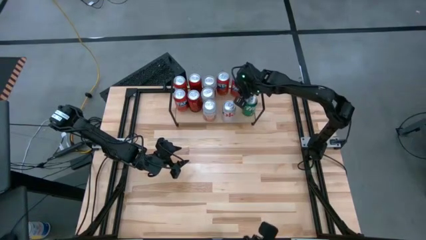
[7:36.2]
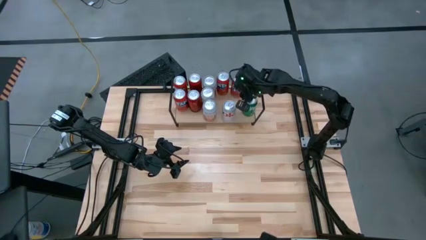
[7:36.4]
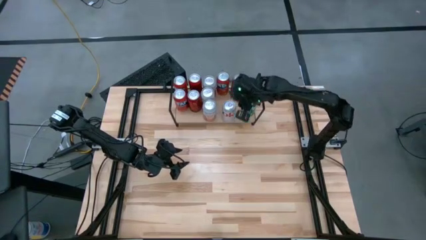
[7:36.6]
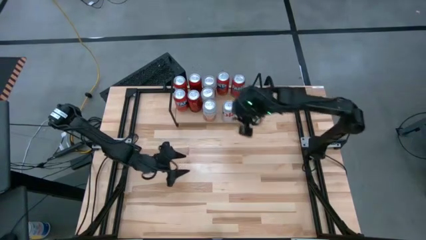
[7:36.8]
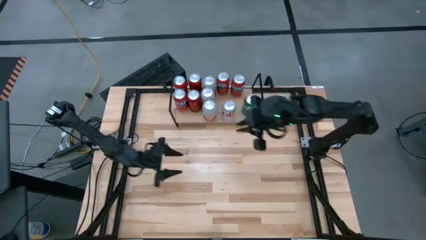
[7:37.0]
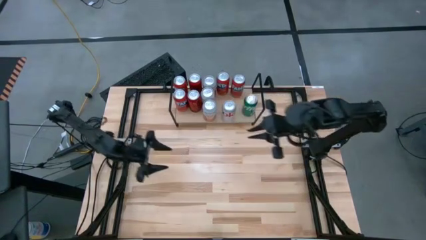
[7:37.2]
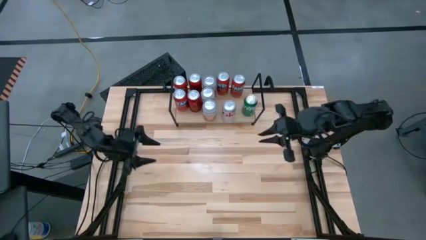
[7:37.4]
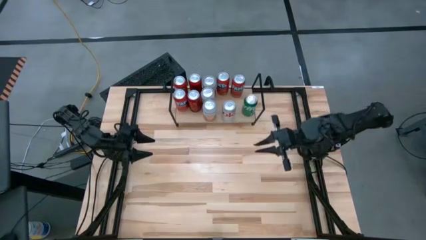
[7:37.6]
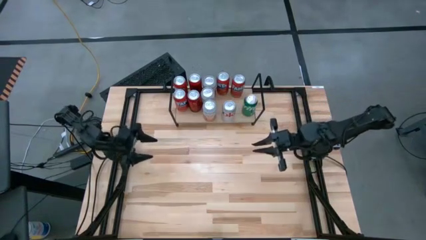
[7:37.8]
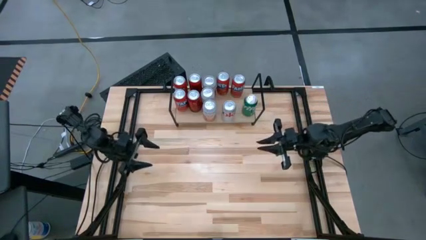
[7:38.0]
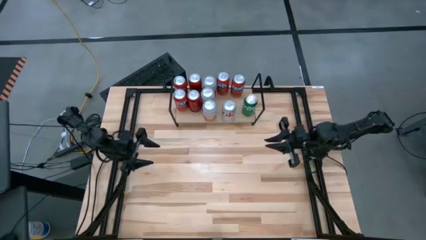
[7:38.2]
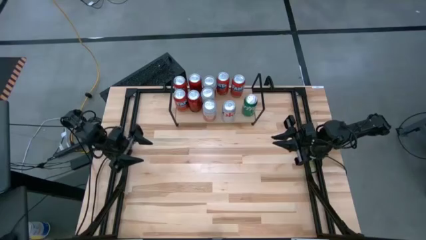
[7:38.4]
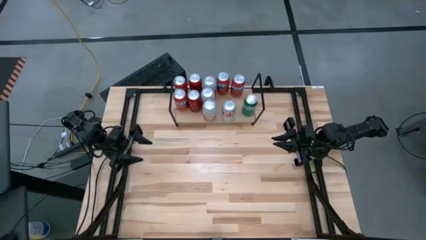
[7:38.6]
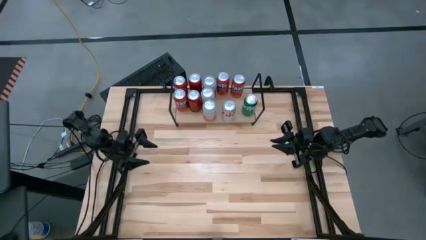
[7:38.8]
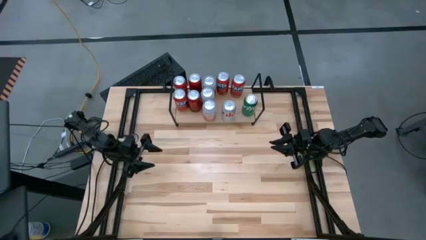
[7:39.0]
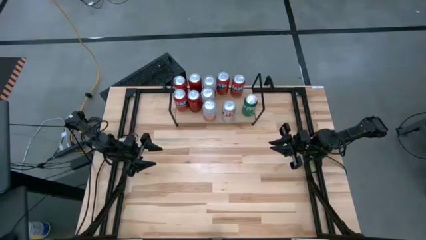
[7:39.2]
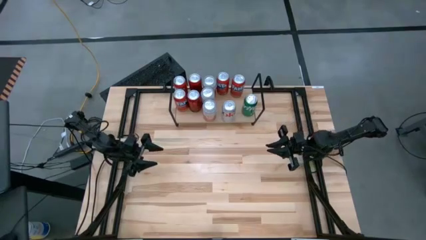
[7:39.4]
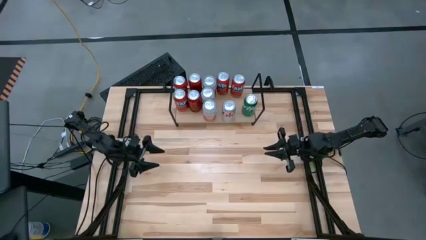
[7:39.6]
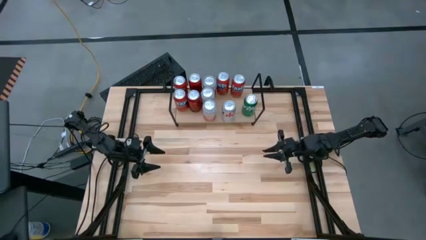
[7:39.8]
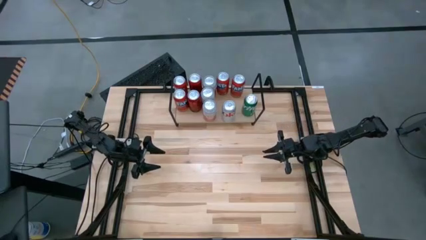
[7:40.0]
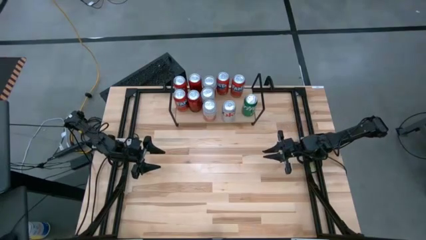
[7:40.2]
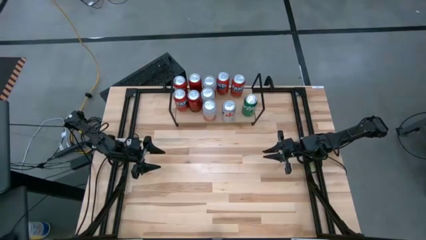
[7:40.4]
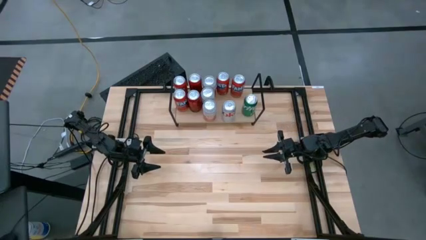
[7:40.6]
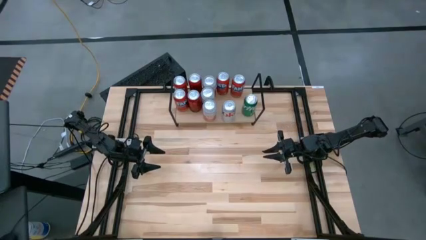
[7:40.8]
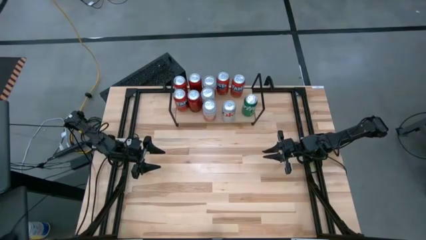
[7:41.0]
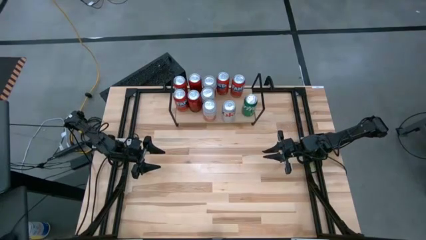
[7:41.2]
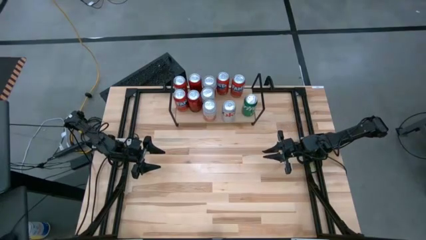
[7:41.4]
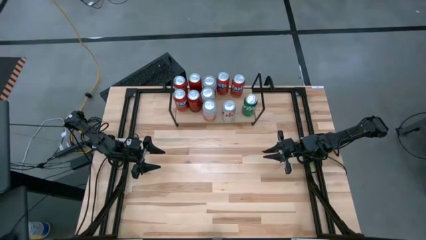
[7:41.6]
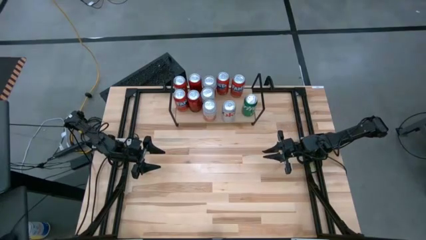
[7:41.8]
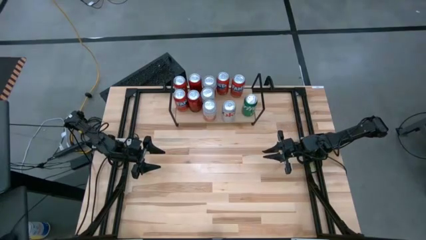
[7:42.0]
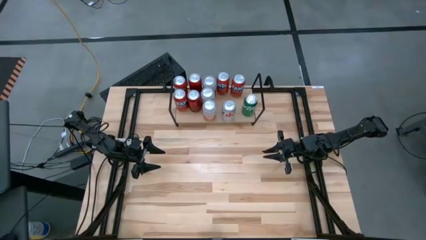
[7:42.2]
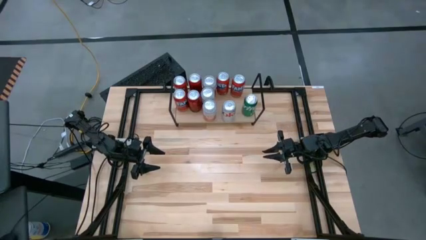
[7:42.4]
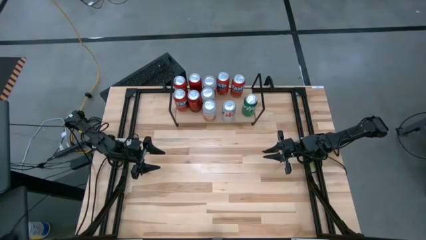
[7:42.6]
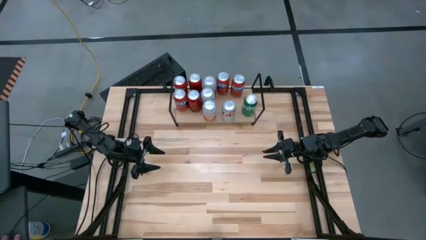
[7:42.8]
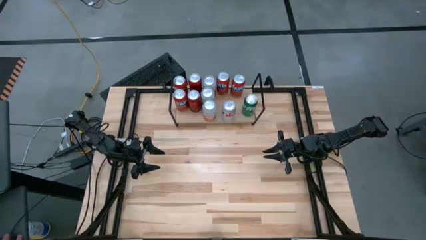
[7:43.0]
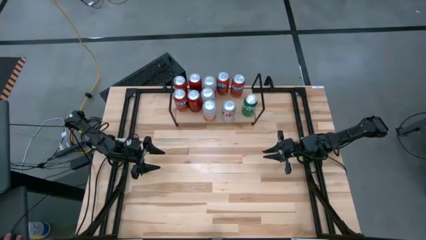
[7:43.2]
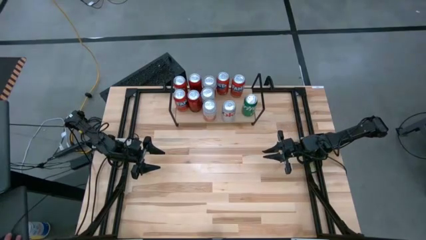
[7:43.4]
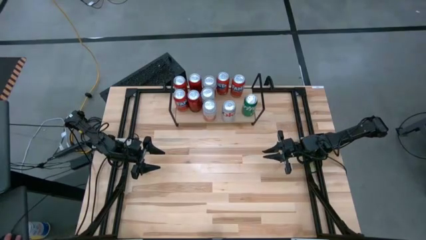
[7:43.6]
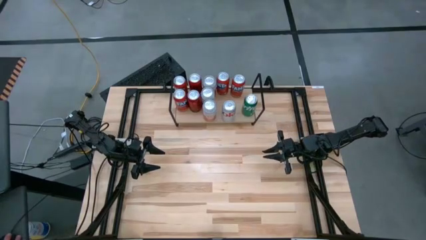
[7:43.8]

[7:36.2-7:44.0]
Task: Place canned beverage on shelf
Return to Home Position

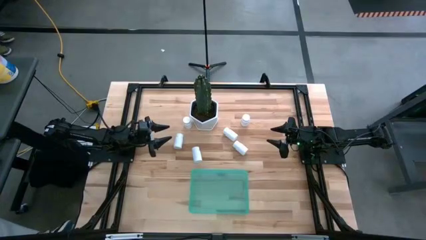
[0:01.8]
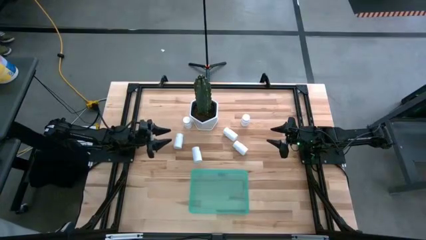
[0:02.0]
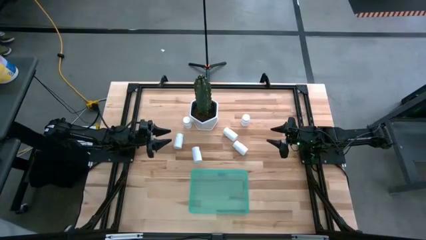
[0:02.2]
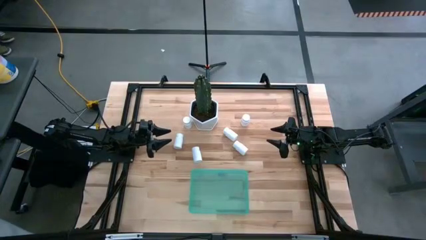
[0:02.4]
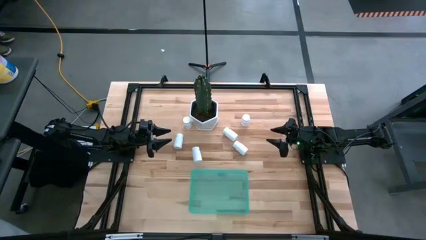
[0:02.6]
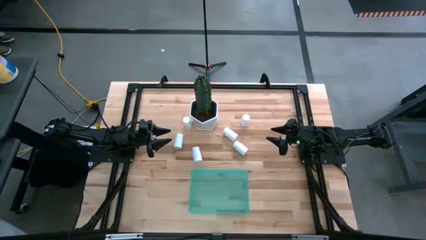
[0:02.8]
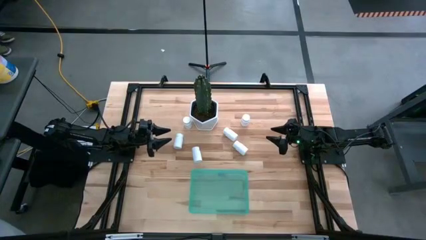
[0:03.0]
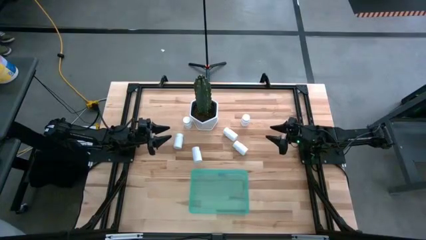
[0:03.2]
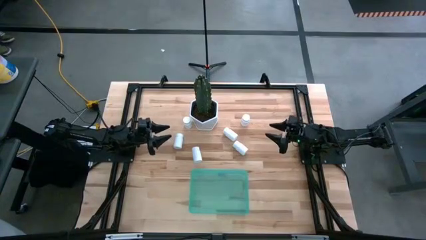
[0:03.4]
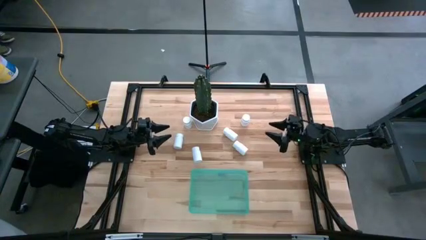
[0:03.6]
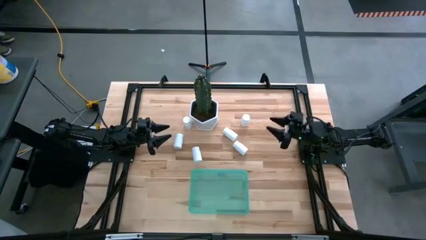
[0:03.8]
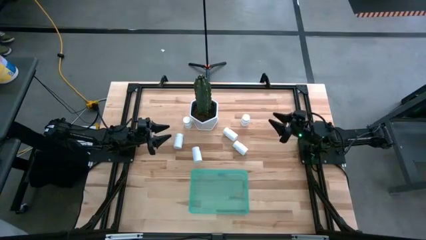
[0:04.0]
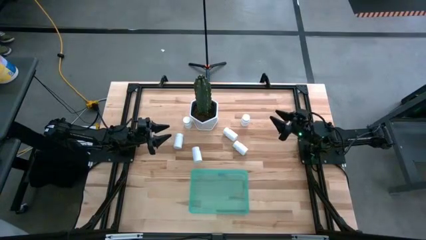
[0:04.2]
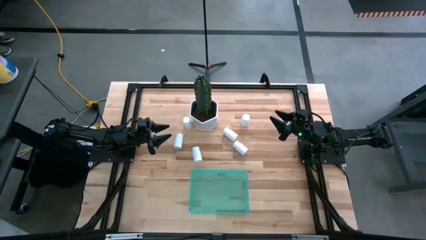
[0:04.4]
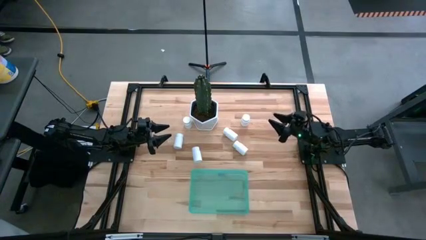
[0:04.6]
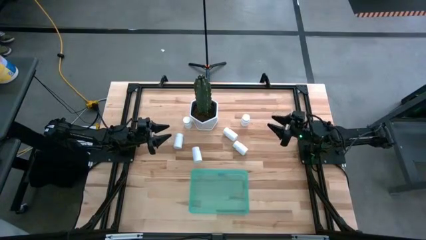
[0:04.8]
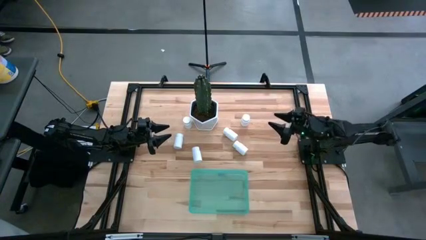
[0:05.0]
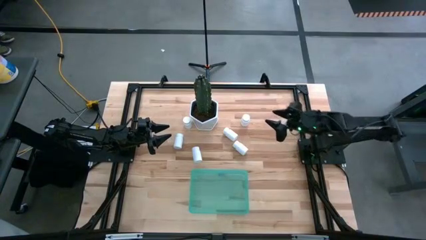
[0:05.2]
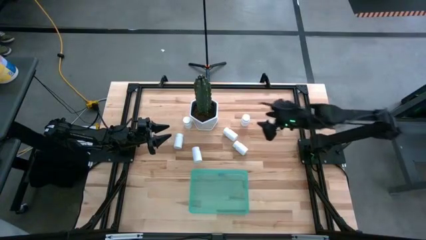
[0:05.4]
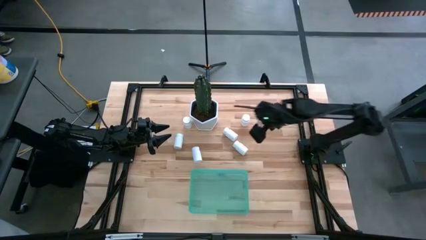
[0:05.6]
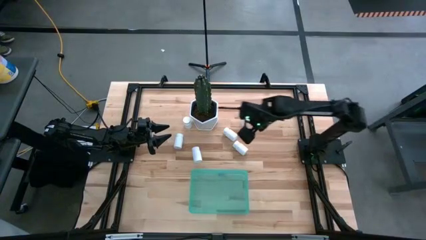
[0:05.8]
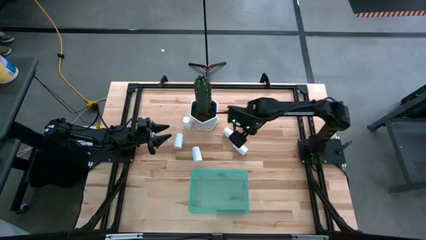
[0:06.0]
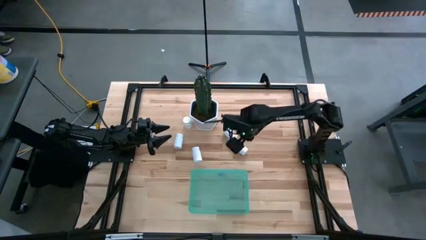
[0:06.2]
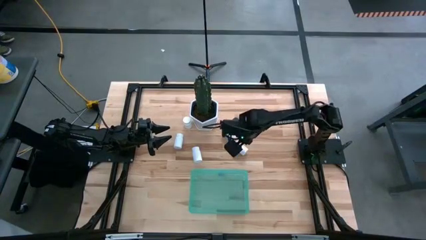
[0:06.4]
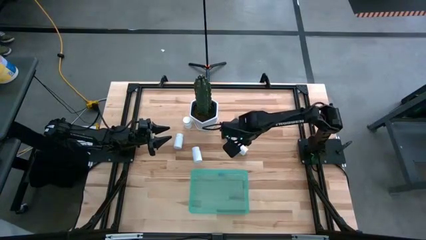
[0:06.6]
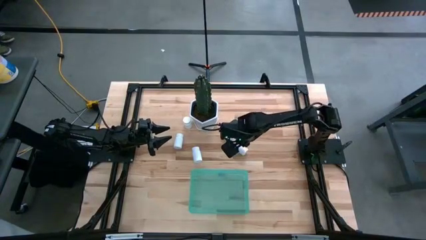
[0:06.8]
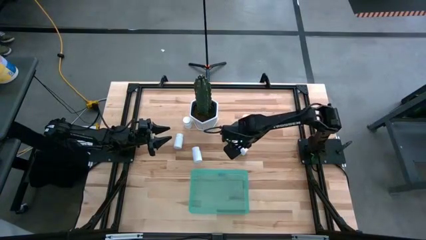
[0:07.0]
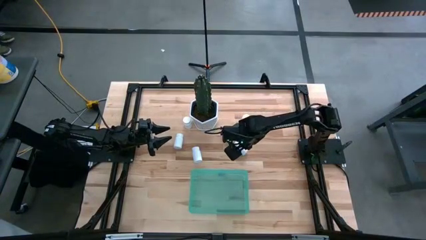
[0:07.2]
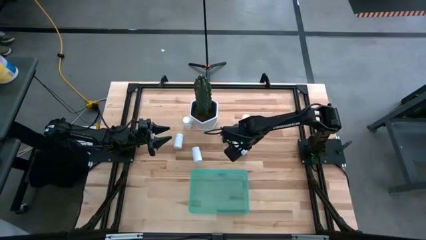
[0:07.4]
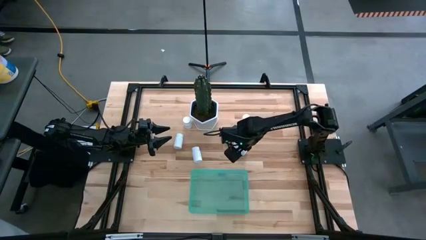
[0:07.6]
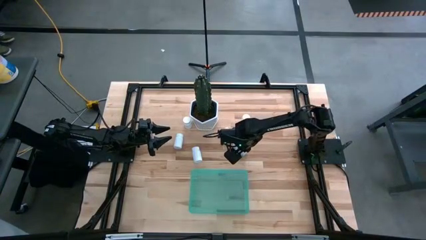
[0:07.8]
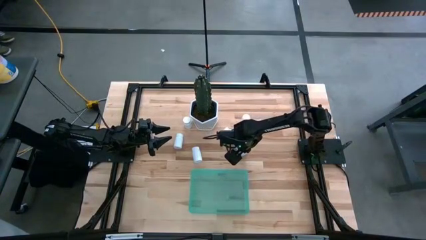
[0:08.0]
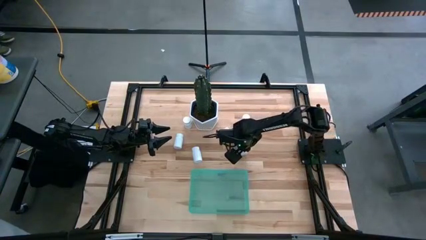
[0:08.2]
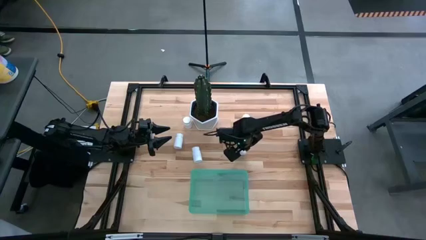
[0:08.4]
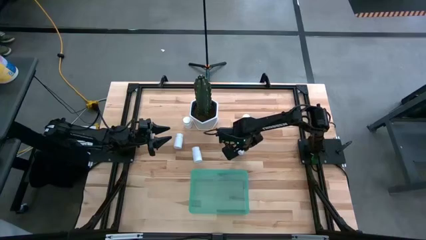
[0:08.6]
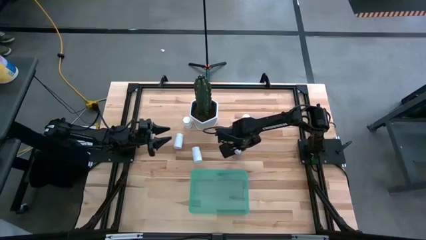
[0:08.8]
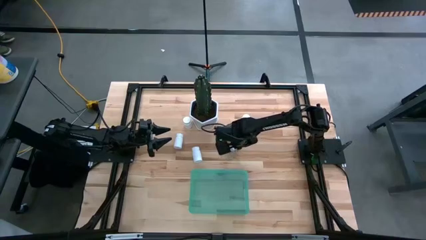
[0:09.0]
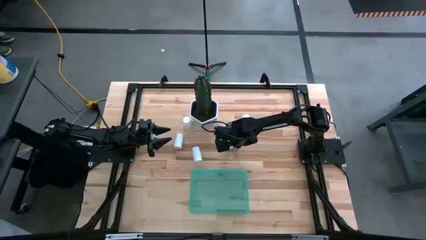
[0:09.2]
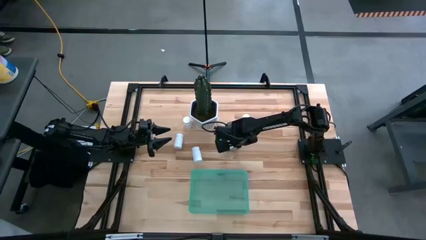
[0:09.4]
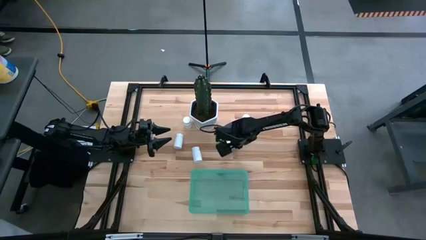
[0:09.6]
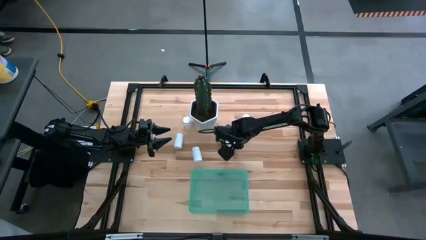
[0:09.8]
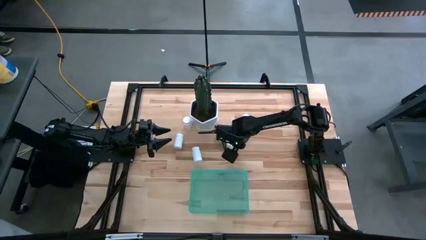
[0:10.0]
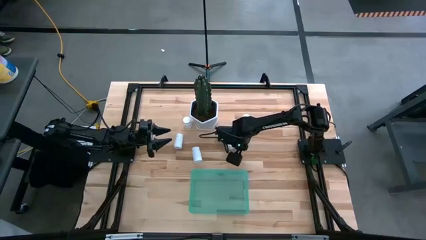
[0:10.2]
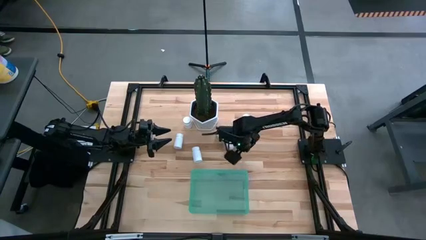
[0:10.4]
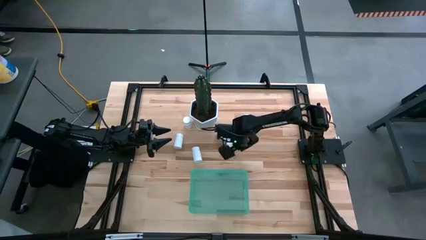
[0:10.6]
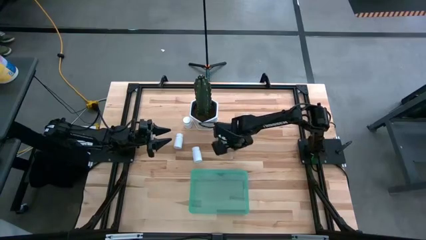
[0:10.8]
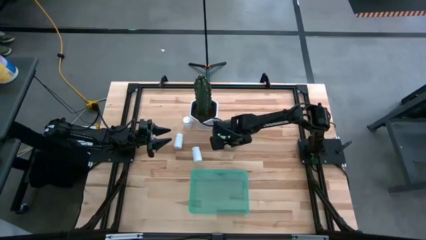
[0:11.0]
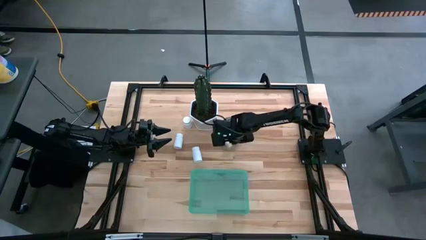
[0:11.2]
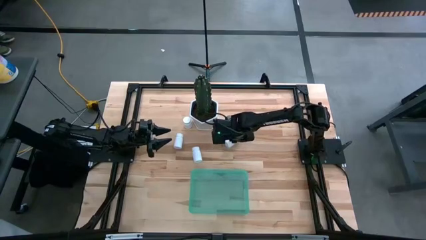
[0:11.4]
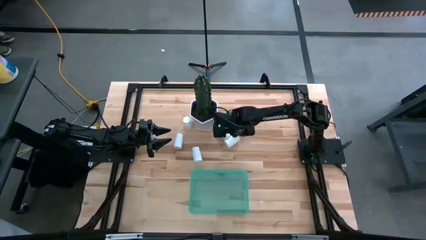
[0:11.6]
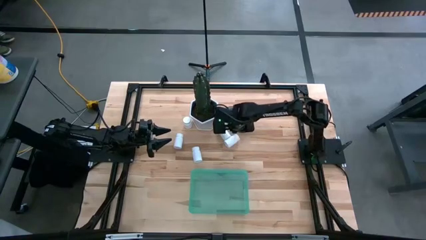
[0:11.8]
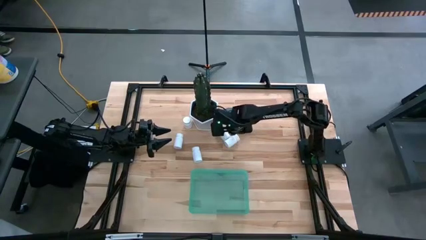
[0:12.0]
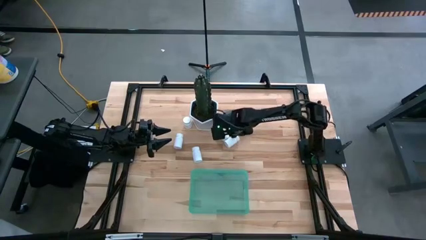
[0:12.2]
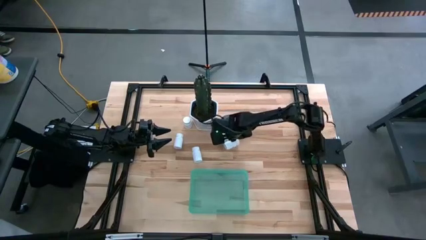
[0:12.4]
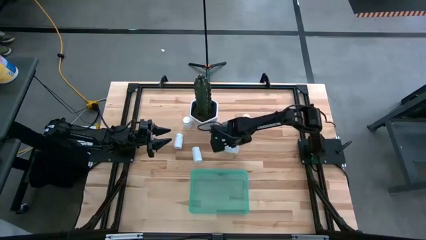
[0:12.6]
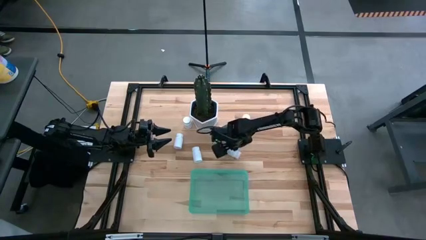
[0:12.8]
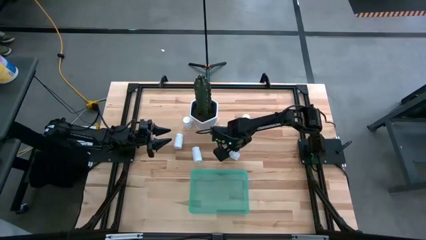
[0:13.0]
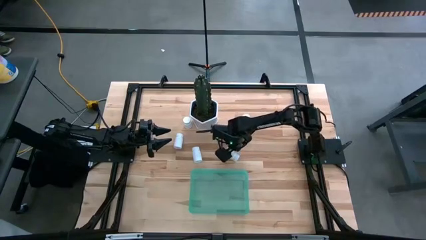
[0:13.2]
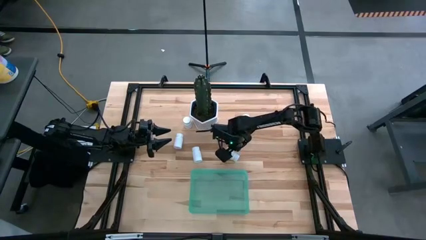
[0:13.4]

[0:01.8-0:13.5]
Task: Pick and place pill bottles into a basket
Put the white pill bottle into the green bin
